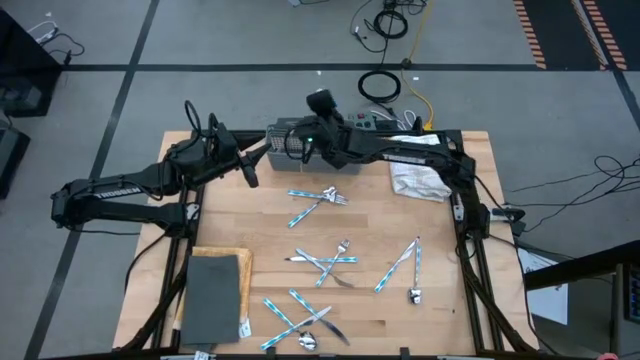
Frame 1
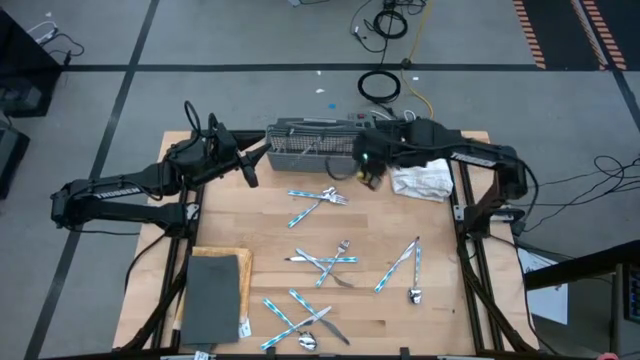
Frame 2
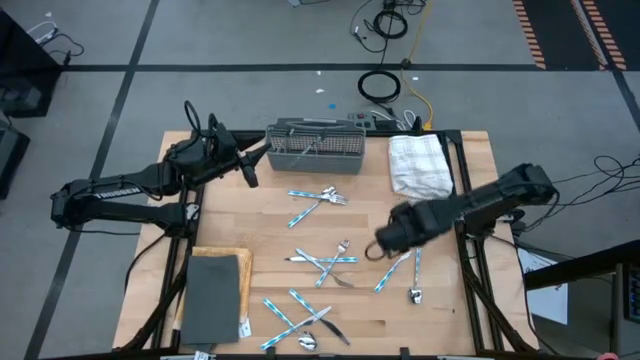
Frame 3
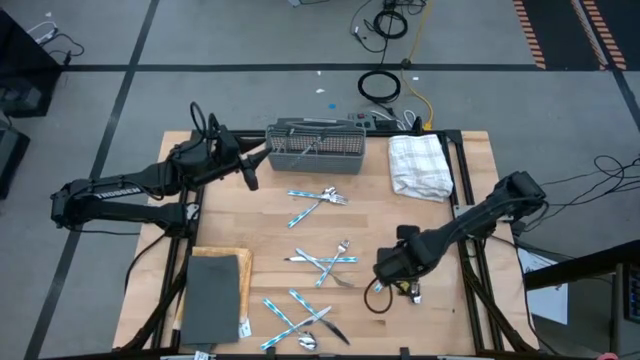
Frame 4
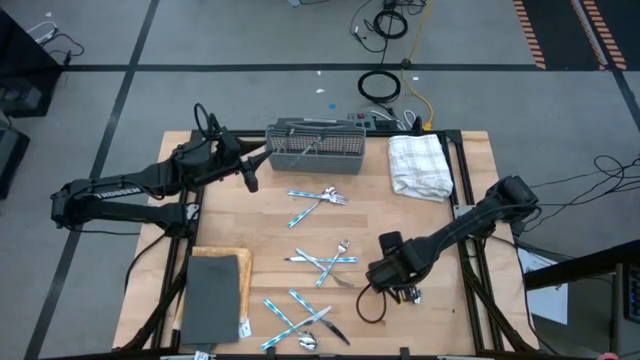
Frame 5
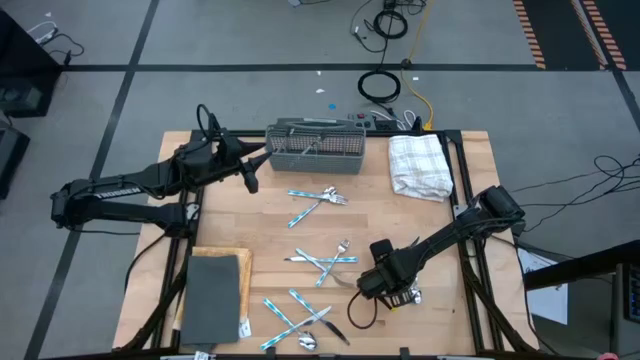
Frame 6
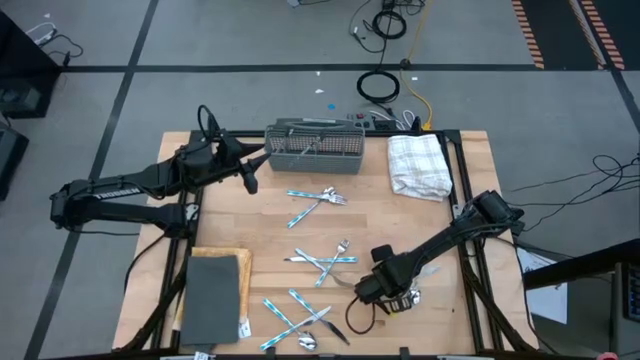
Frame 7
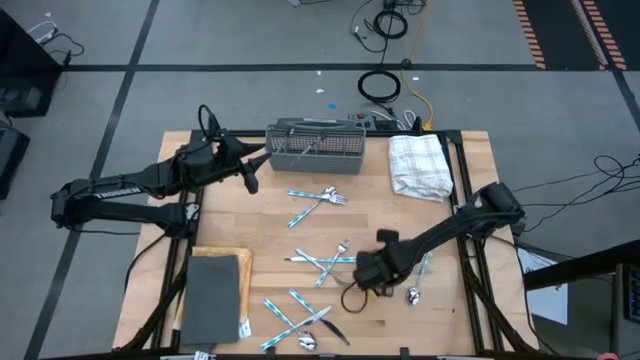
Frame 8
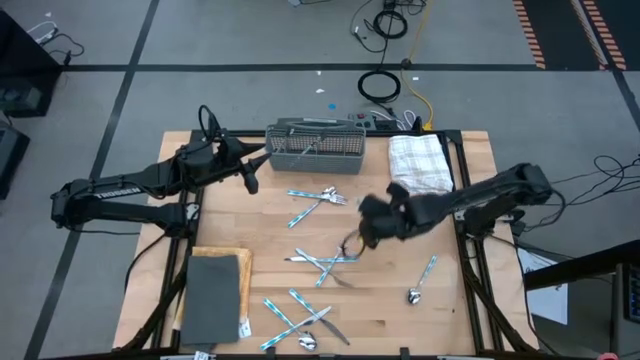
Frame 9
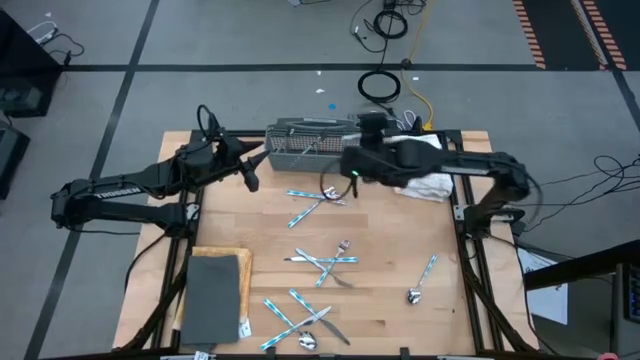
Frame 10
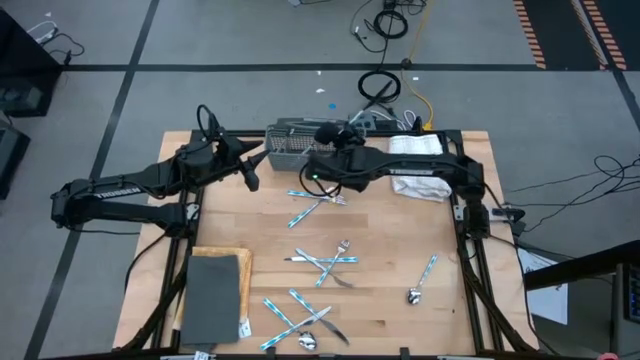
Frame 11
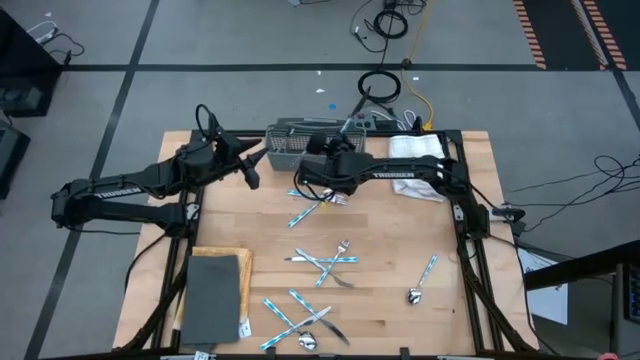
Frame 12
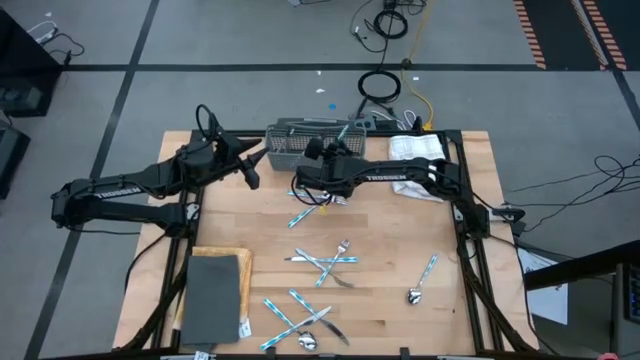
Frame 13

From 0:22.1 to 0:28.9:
Task: Sort silverware
Put the blue knife into the silverware basket

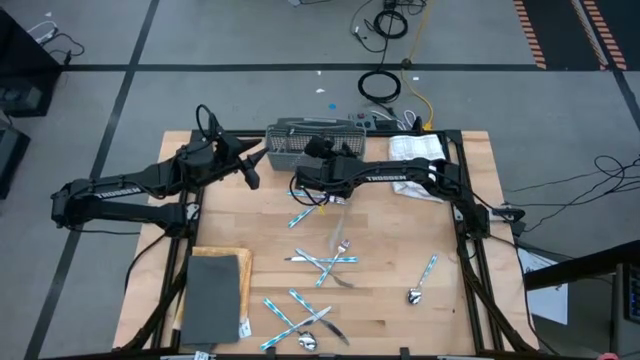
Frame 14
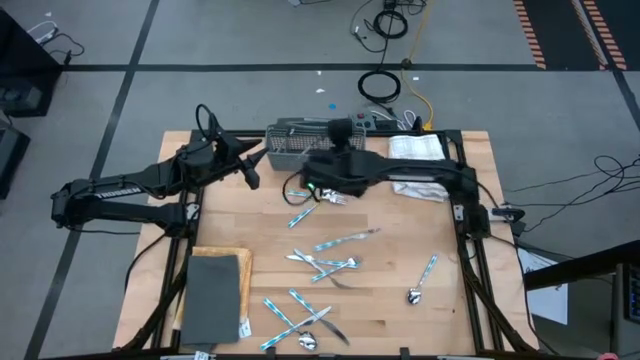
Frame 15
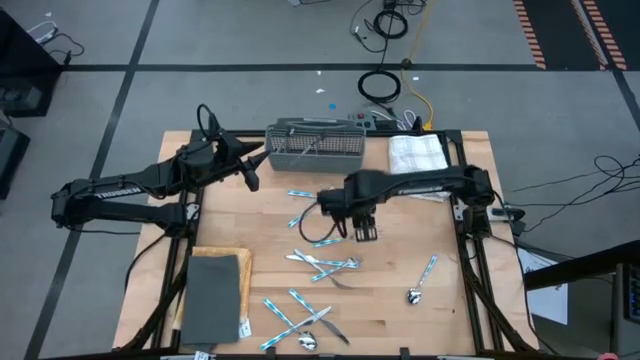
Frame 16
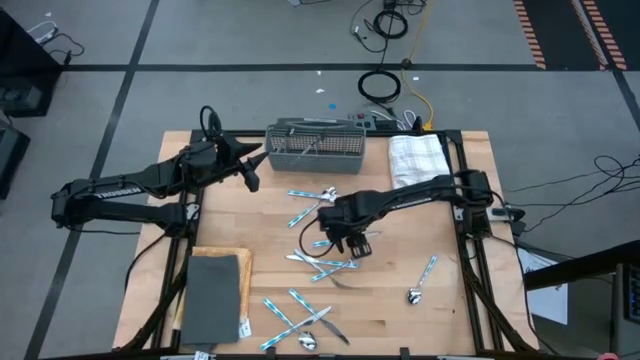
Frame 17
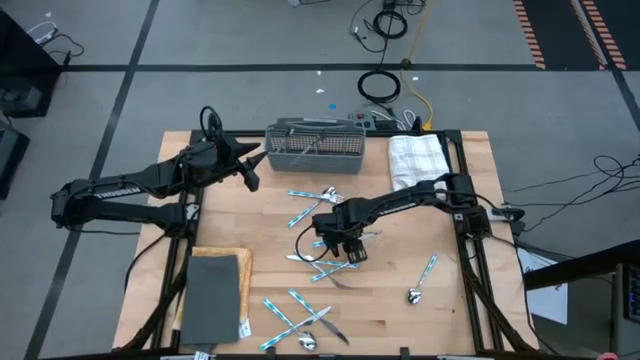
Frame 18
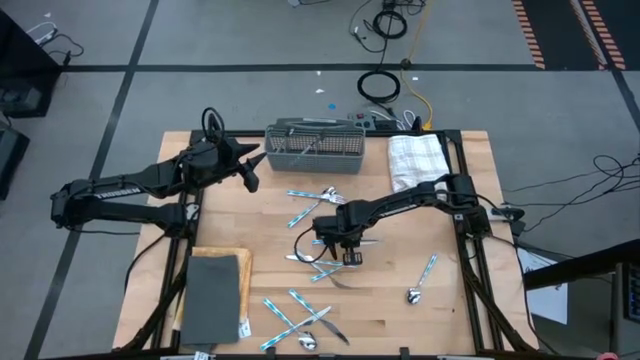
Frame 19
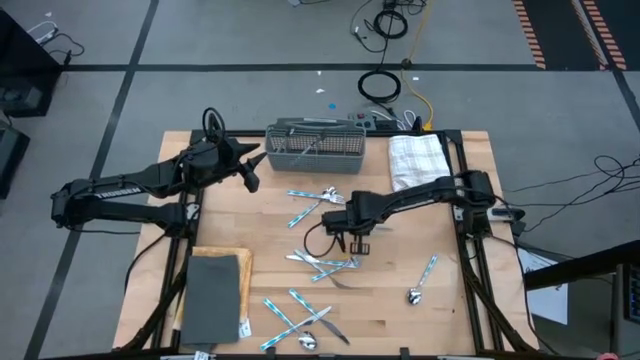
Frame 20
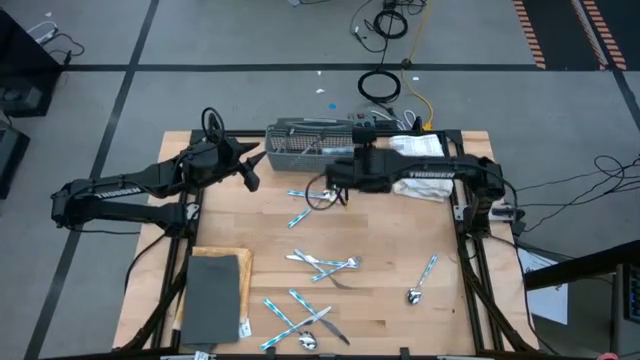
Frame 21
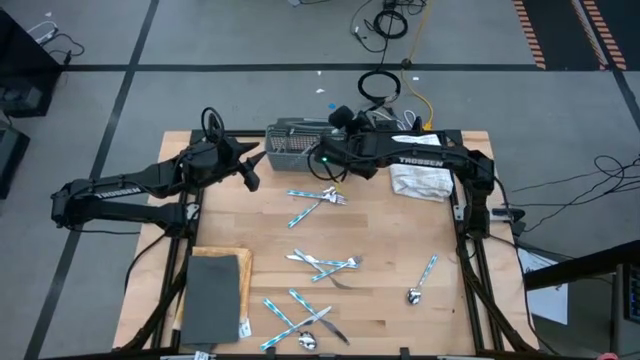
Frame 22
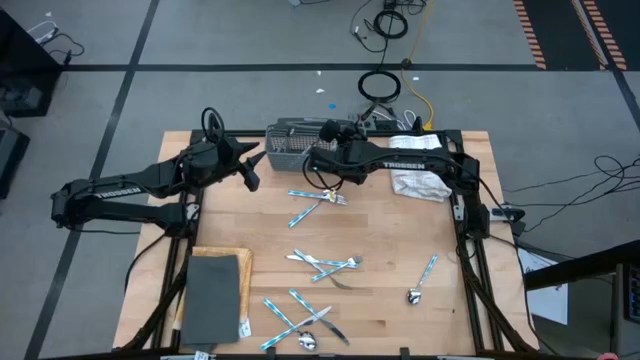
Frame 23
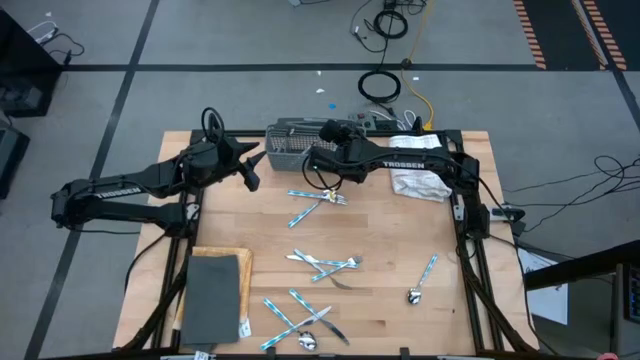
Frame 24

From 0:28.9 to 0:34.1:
Put the blue knife into the silverware basket

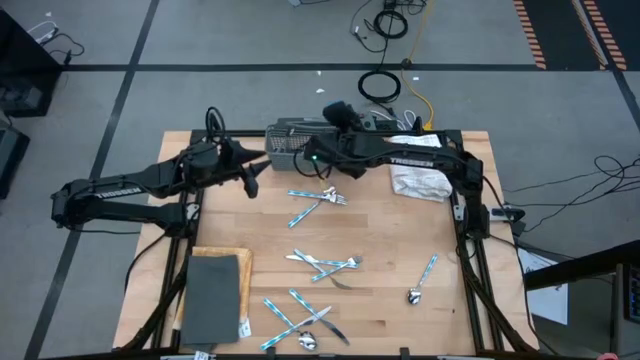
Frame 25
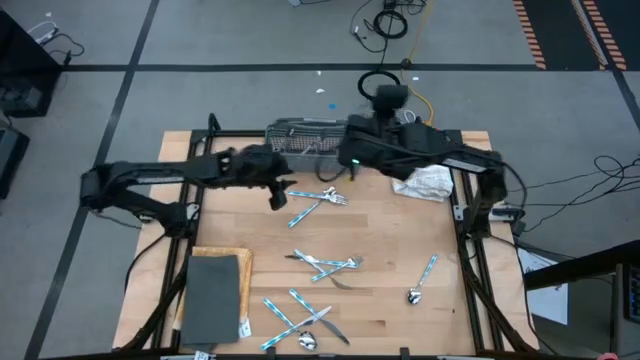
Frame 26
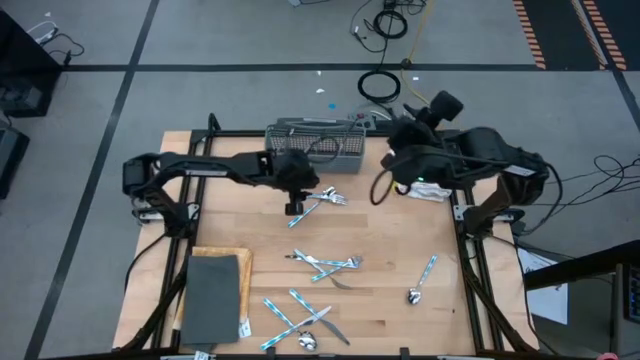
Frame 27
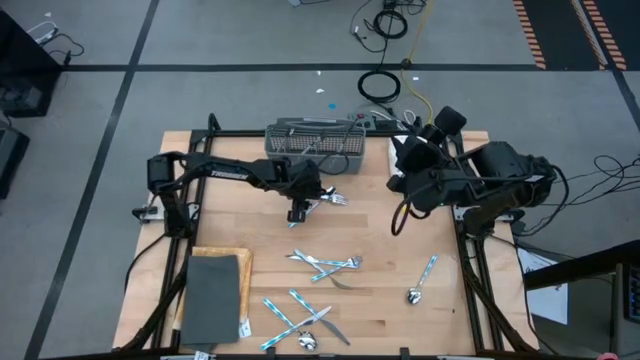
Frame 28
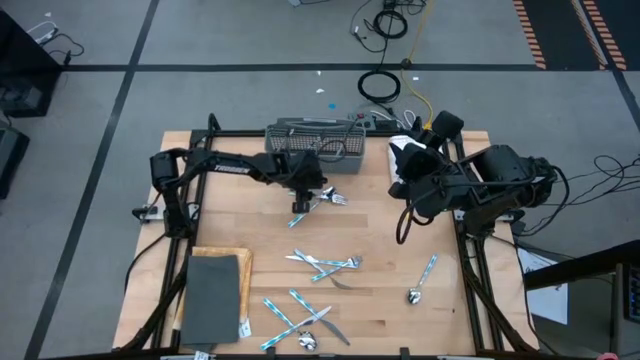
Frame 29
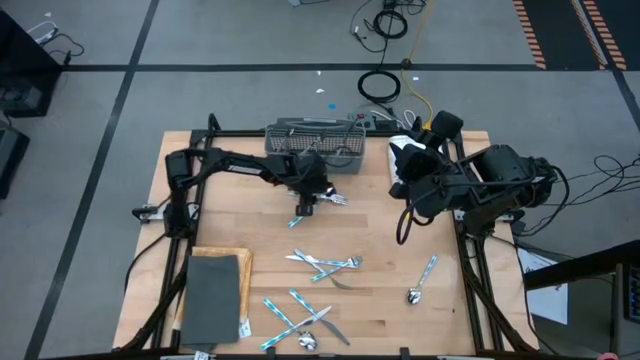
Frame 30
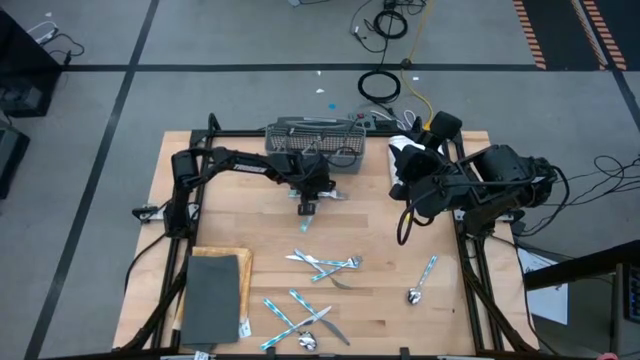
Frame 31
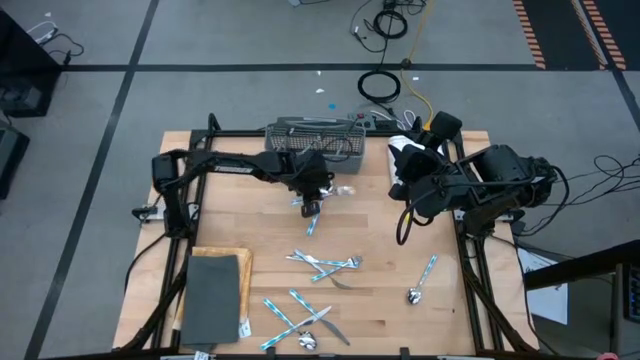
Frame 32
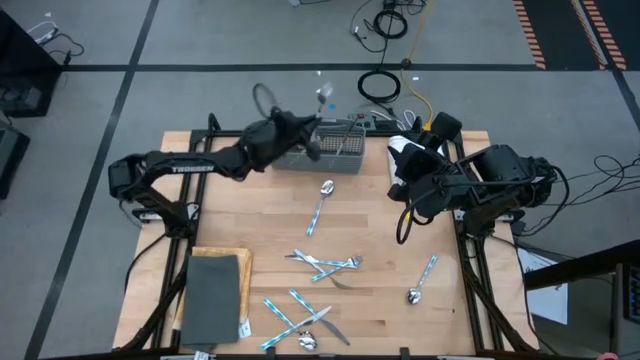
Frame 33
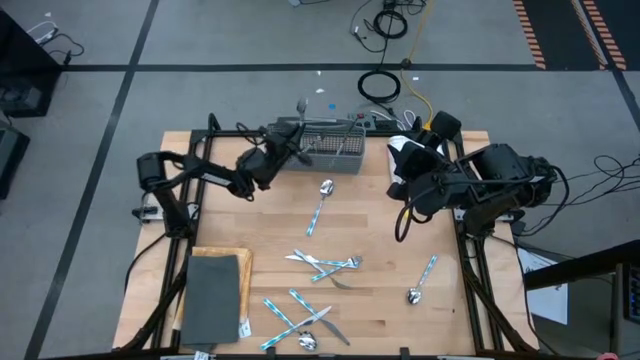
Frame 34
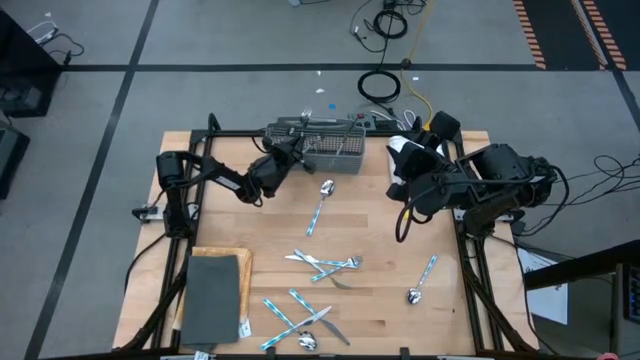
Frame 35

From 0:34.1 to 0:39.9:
Put the blue fork into the silverware basket

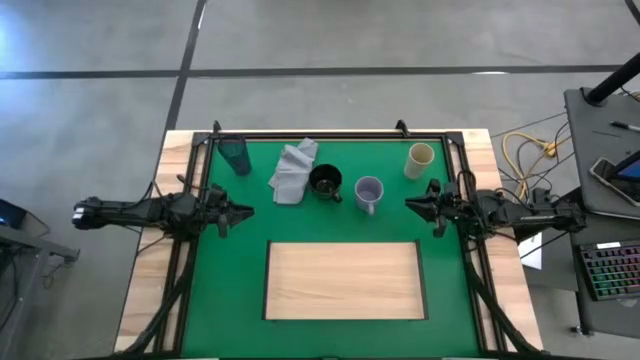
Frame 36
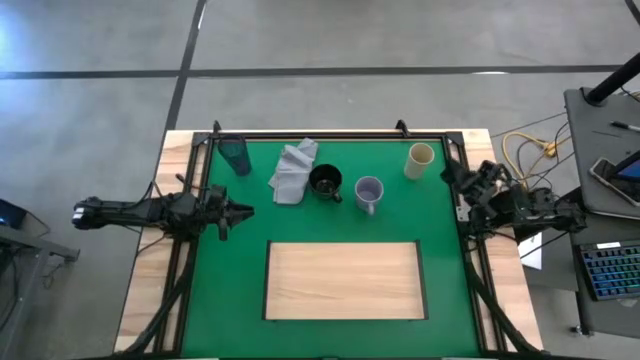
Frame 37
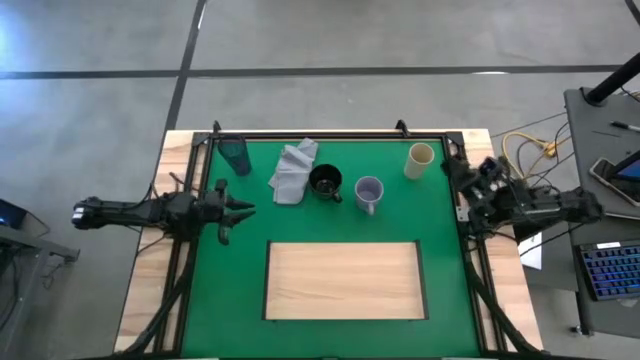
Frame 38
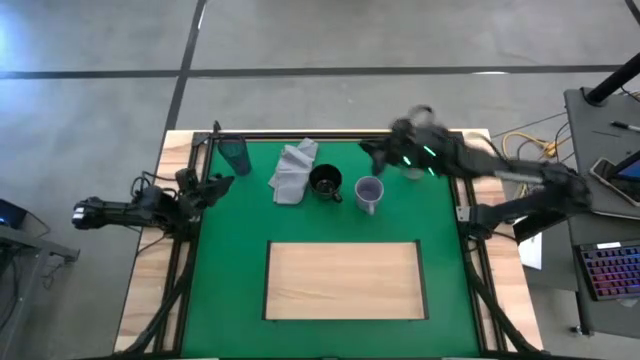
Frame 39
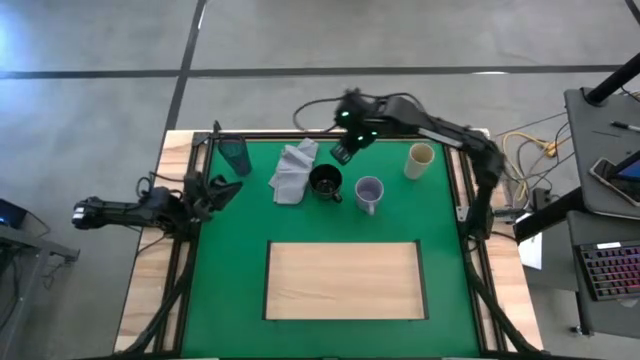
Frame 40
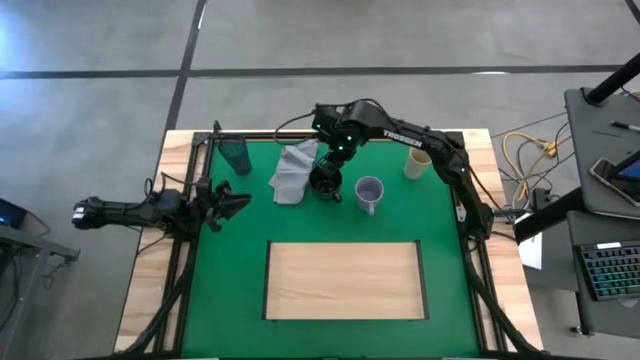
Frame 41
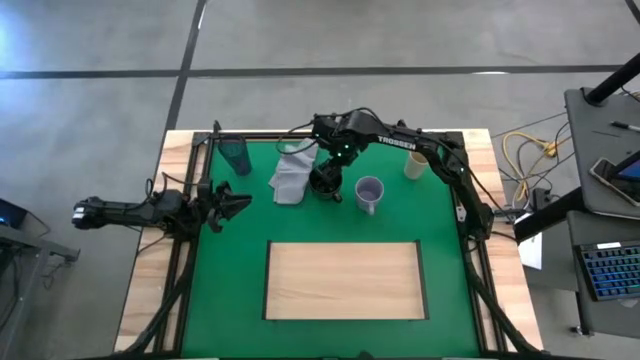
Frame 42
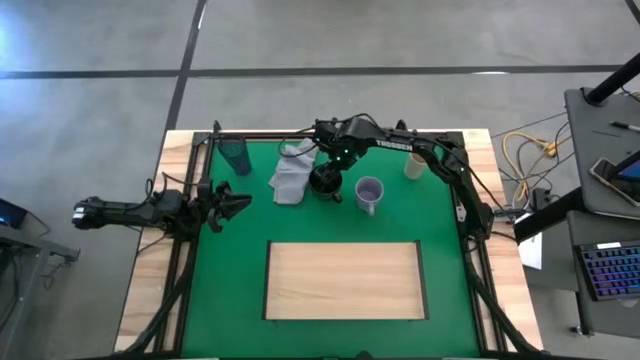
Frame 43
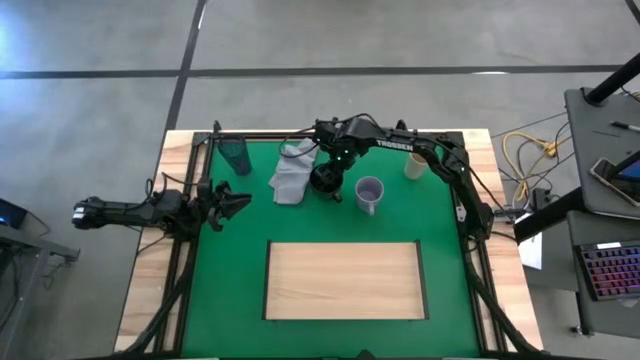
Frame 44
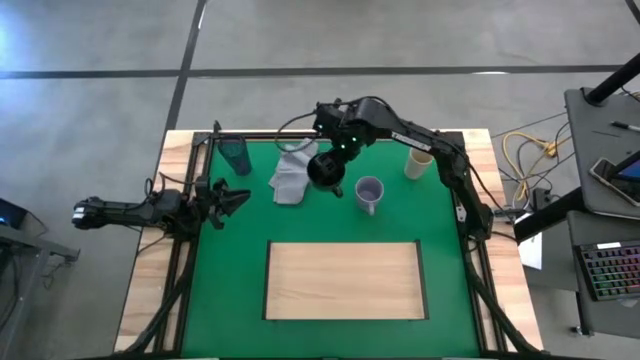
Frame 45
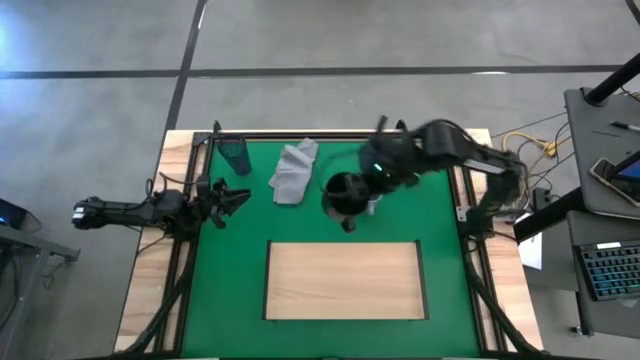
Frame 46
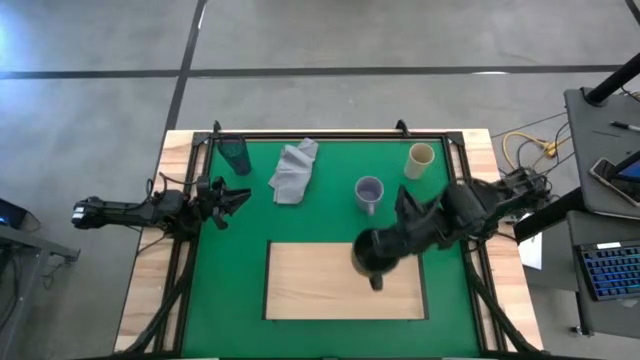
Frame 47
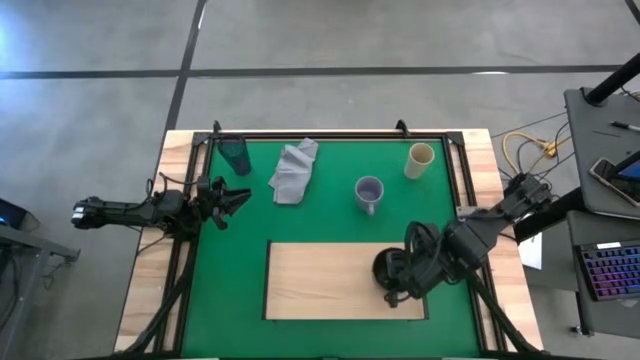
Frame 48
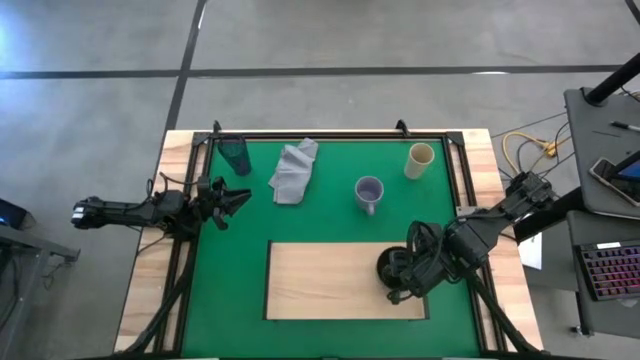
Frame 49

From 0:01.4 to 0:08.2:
Task: Stack small to large cups/mugs on shelf
Put the black mug on the shelf
